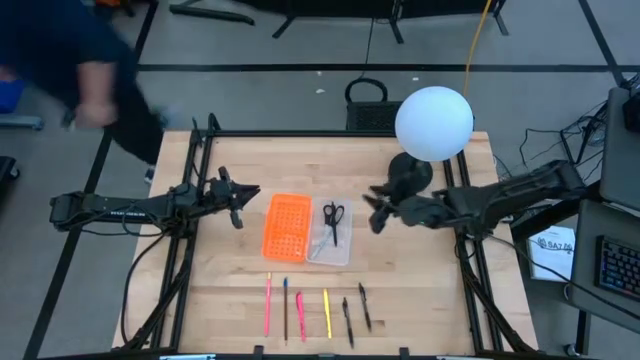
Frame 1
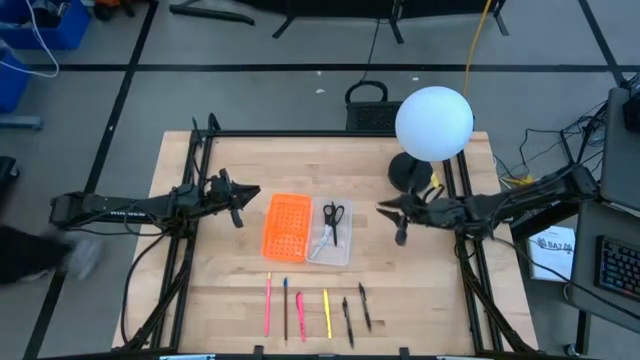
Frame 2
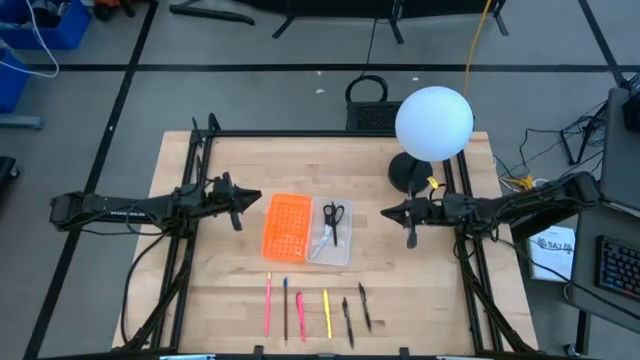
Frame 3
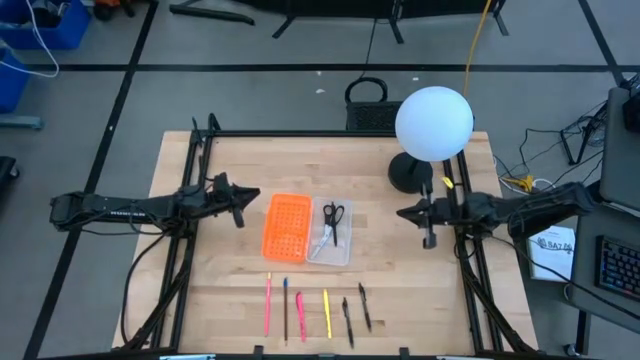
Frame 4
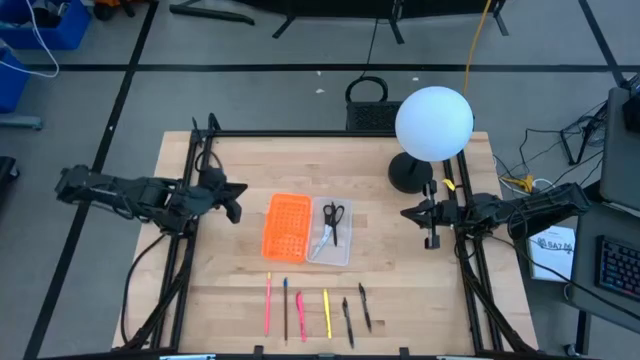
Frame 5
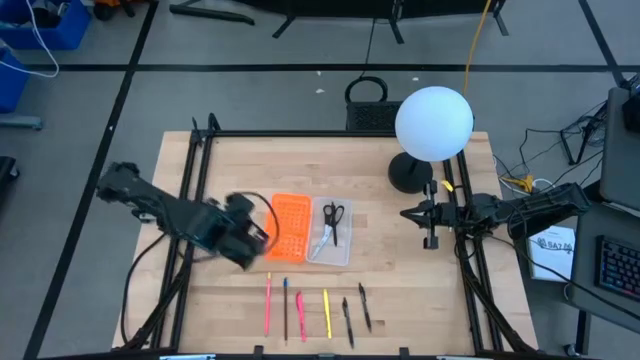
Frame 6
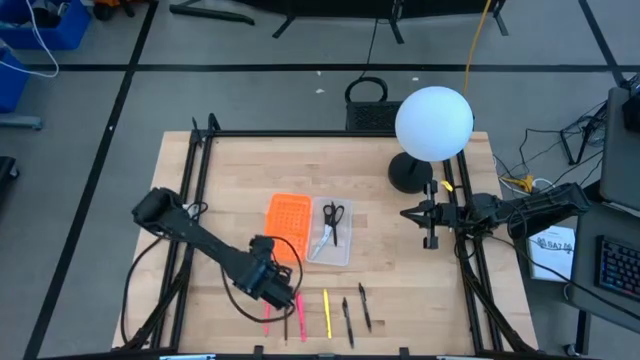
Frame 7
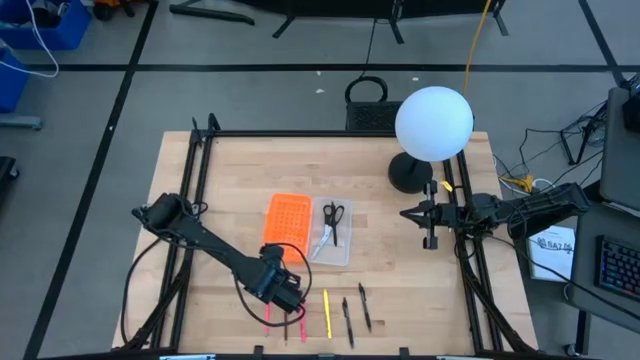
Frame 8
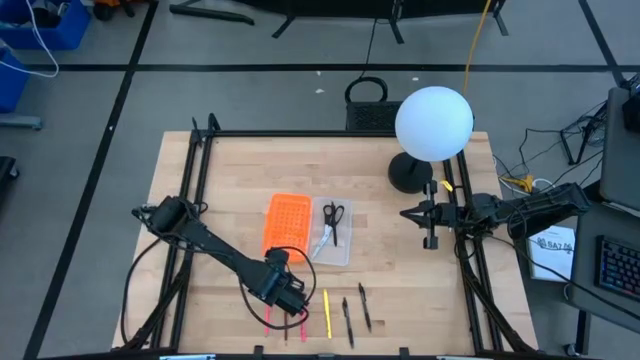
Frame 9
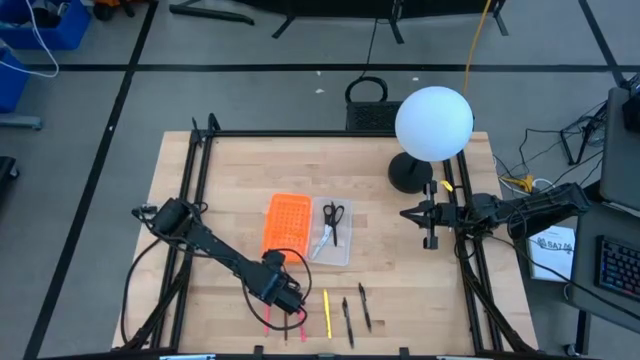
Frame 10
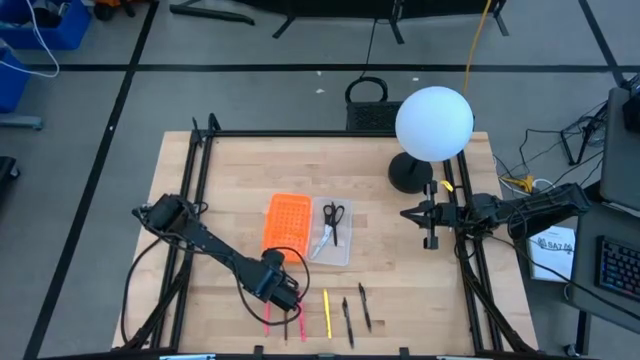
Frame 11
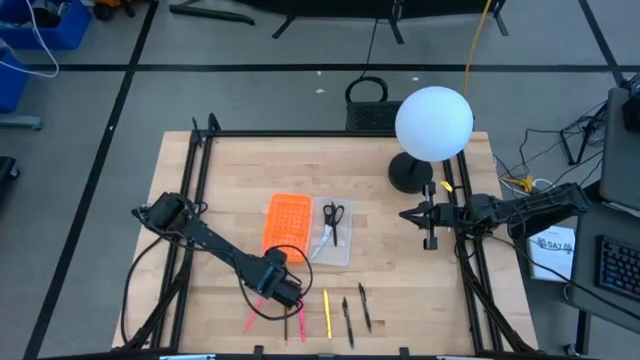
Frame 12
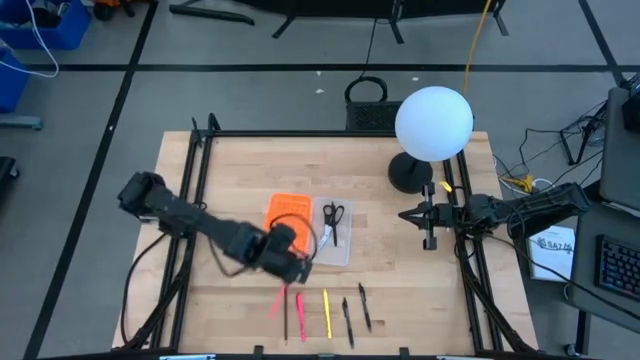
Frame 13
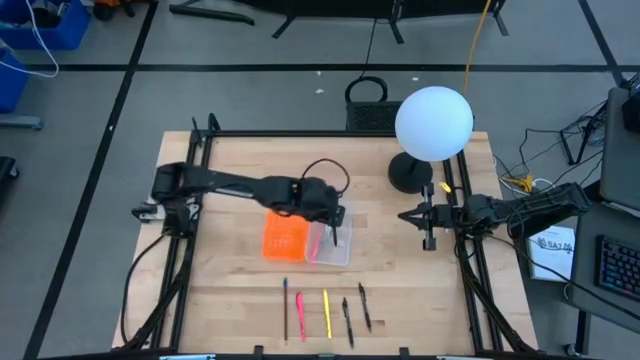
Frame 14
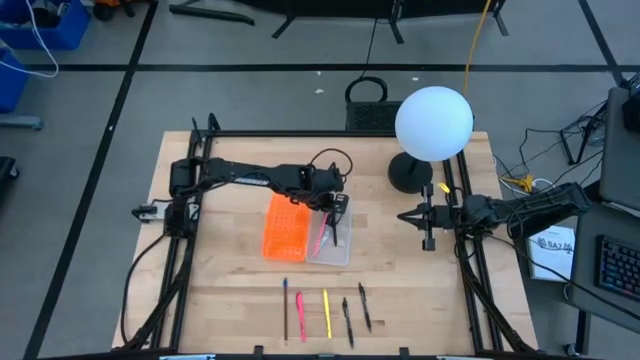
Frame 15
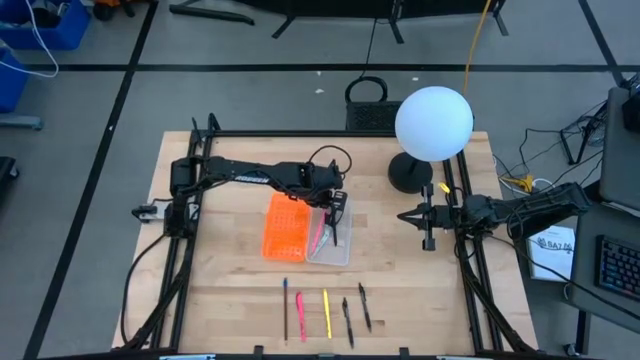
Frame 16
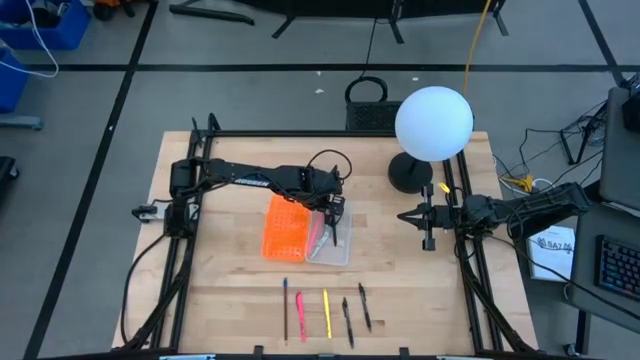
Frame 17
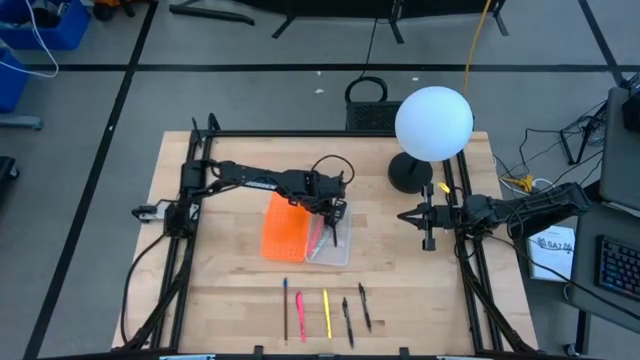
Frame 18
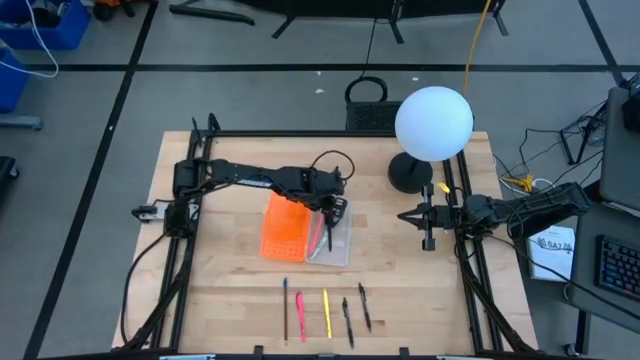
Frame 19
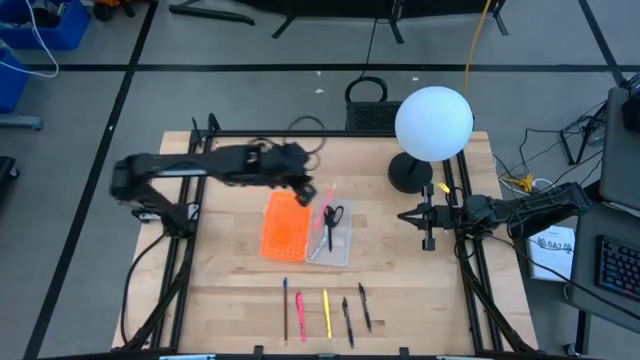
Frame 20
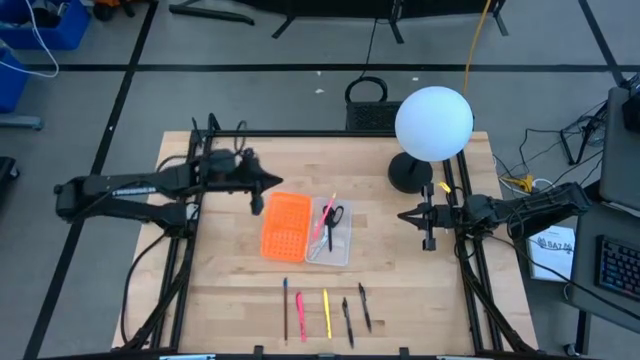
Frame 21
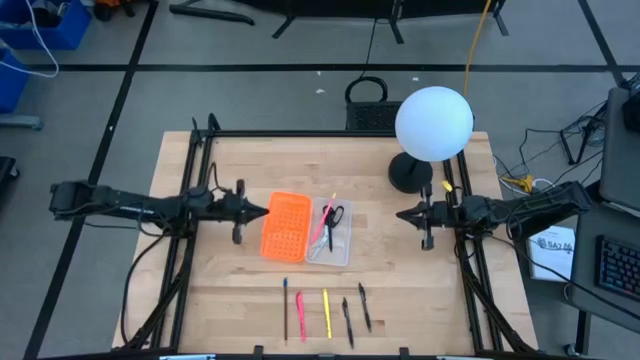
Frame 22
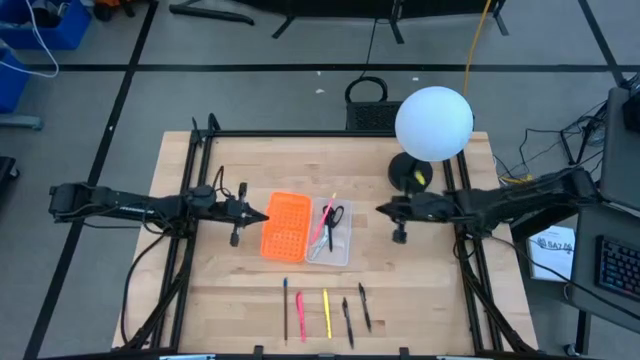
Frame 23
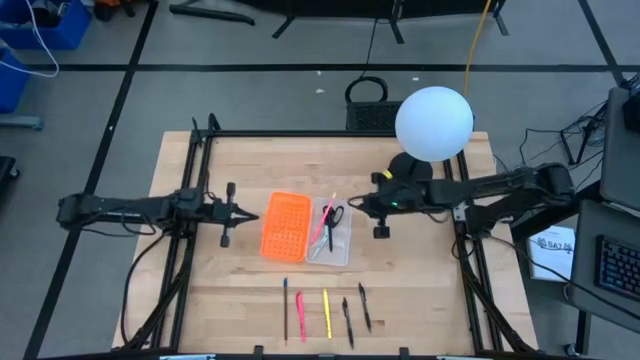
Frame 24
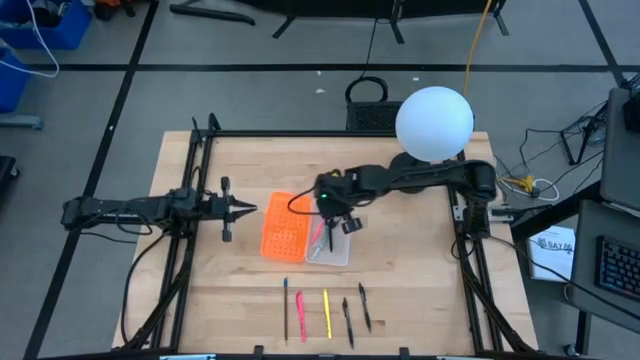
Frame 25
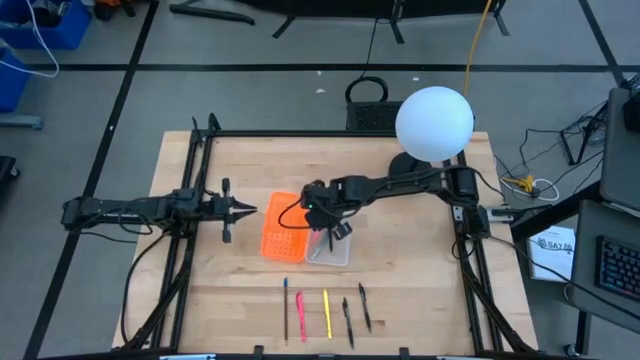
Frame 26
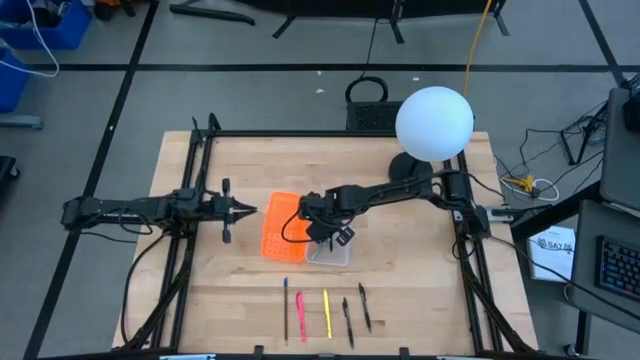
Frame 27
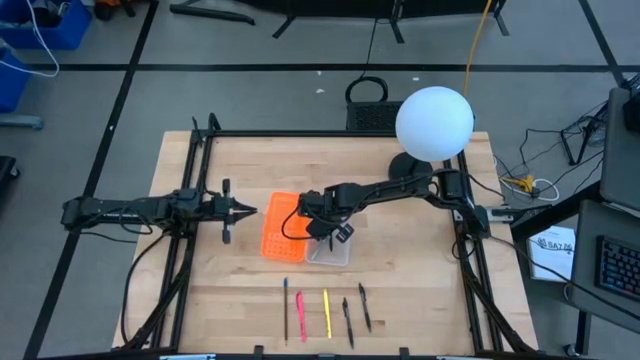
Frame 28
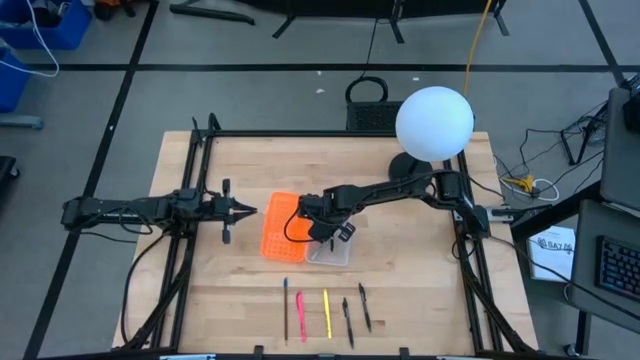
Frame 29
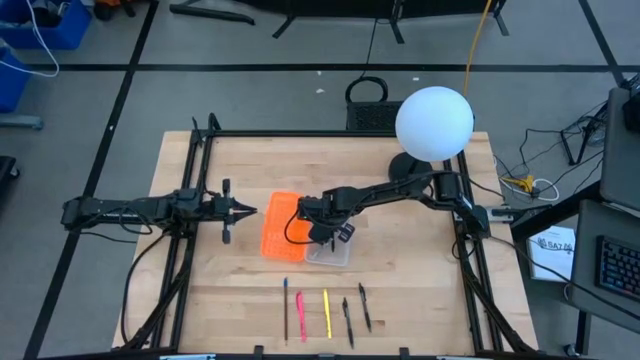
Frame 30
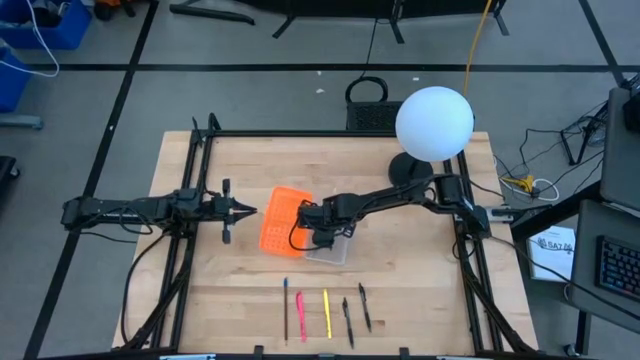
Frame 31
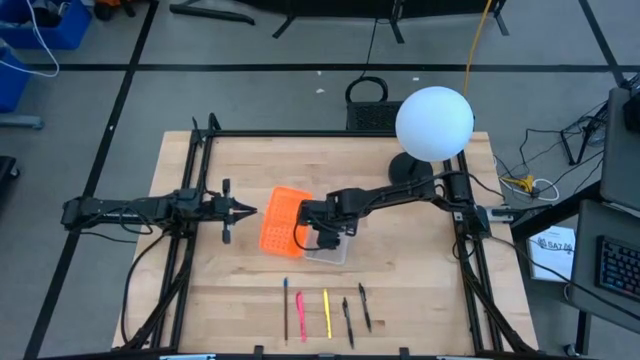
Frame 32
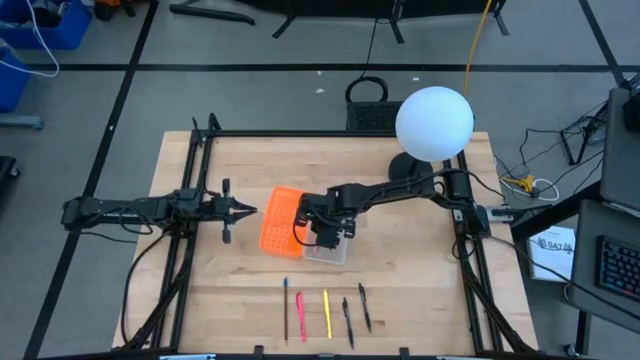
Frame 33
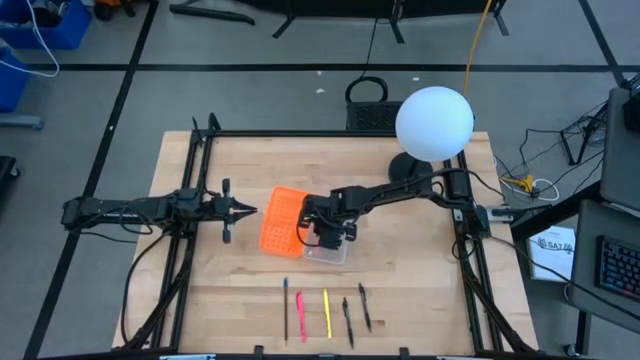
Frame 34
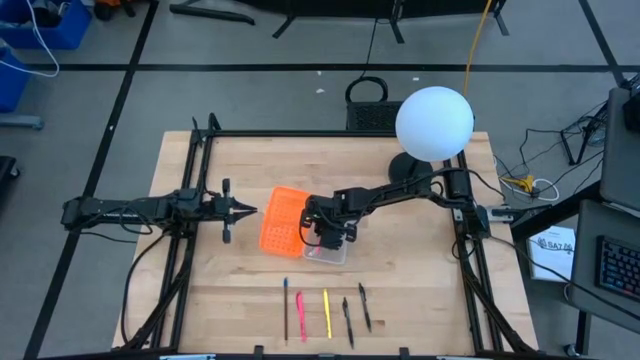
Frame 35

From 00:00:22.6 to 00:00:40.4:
Task: Pick & place school supplies into a supply box
Put the pink pencil into the supply box

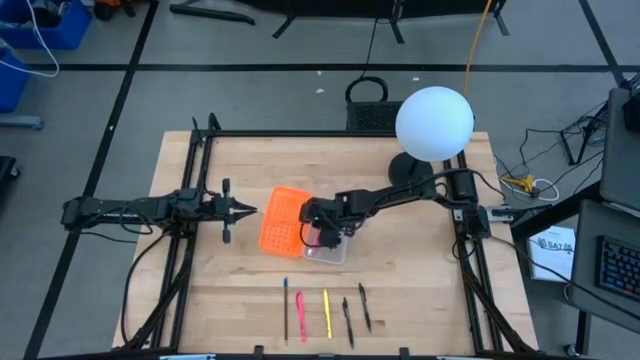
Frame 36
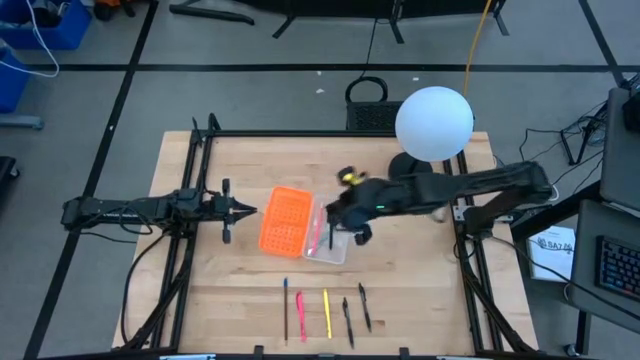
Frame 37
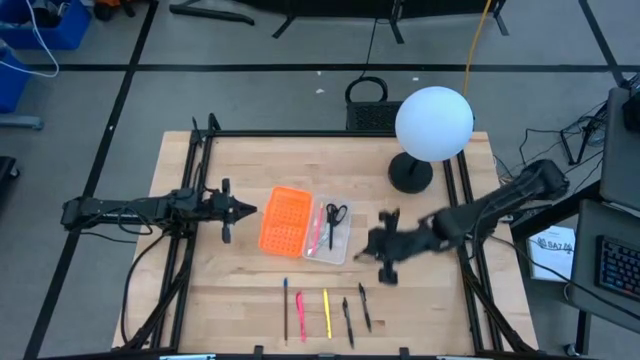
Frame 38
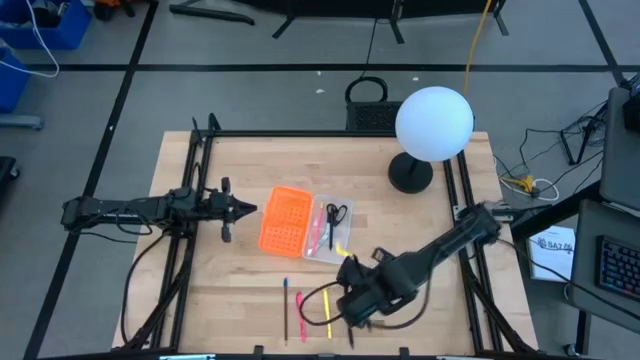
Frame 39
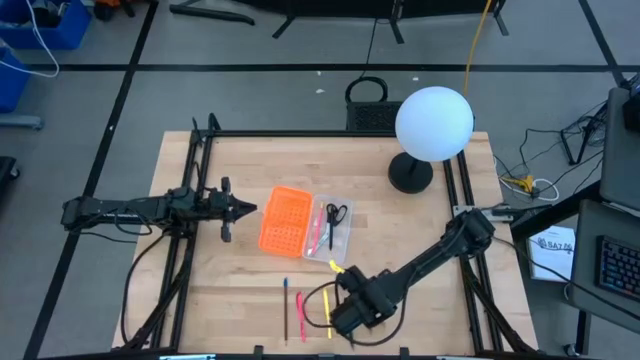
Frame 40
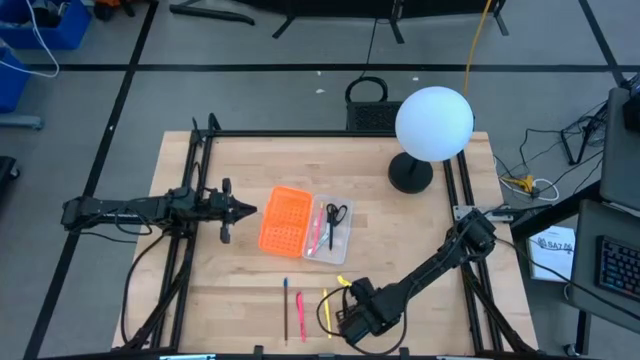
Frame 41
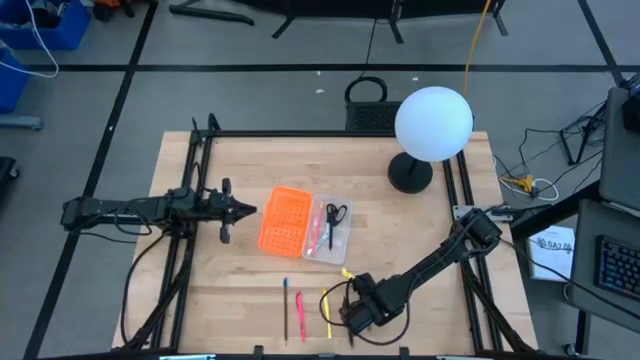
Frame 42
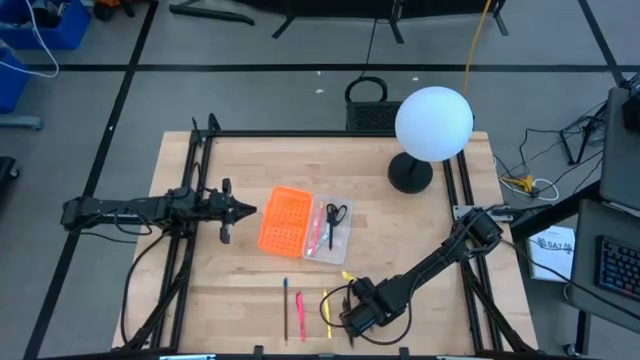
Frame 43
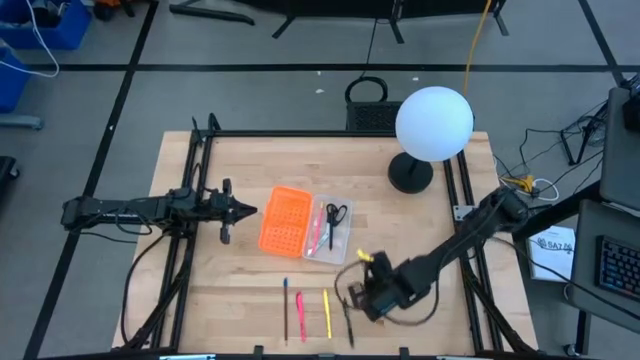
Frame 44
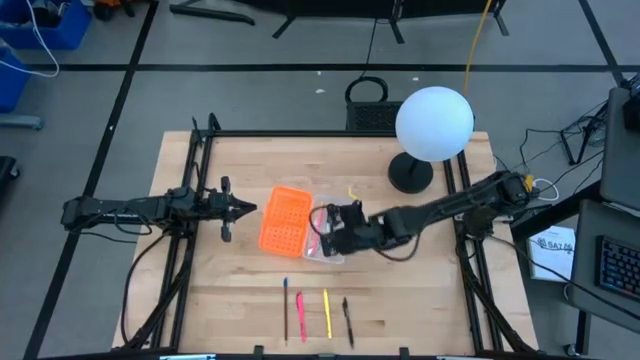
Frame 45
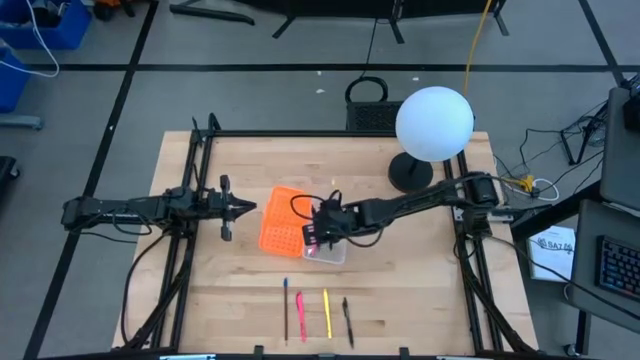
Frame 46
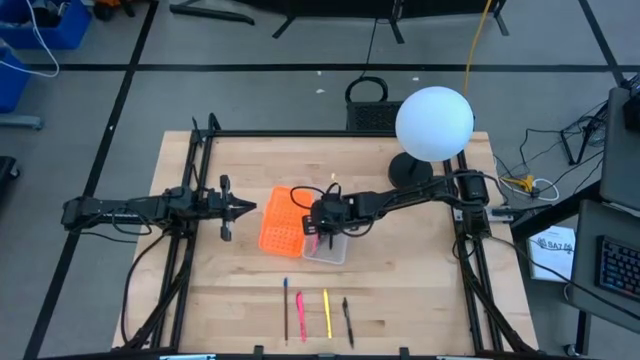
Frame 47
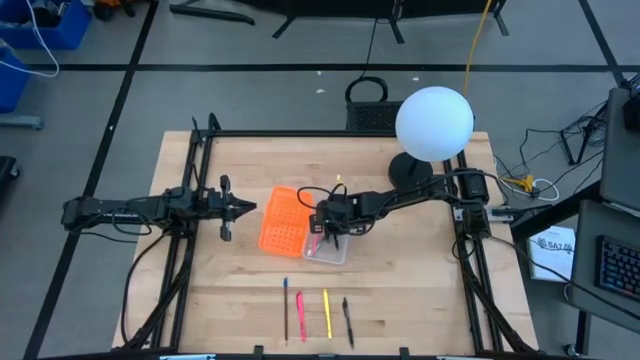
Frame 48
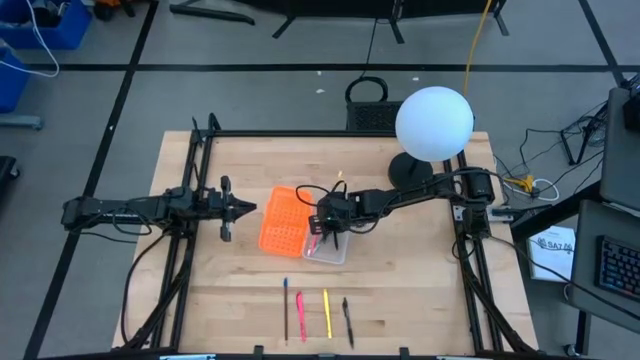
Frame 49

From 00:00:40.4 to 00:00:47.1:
Put the right black pen into the supply box
